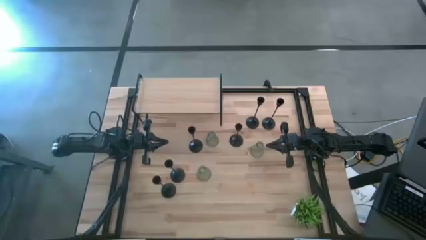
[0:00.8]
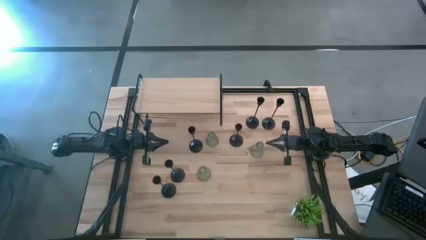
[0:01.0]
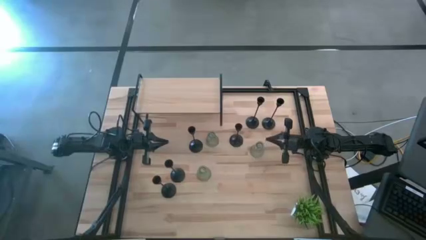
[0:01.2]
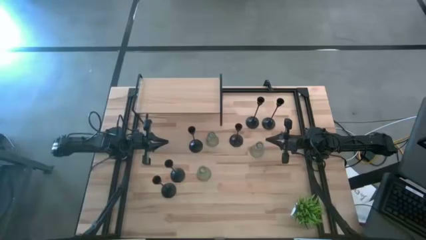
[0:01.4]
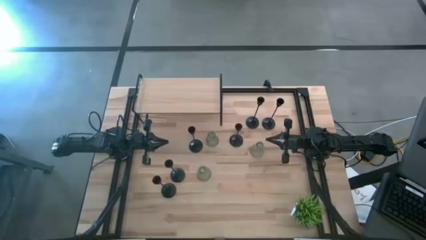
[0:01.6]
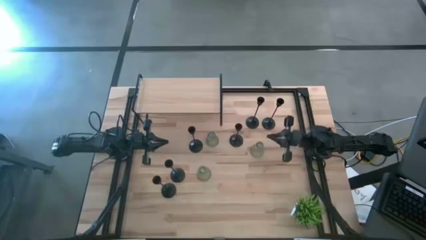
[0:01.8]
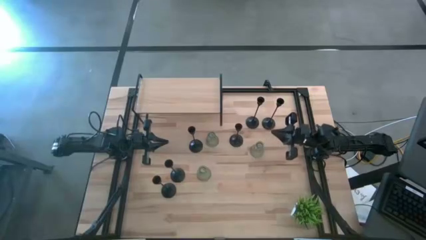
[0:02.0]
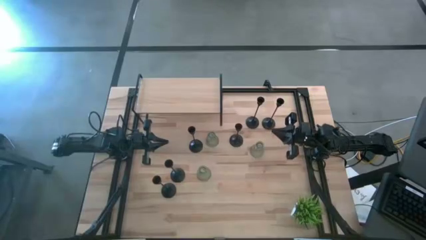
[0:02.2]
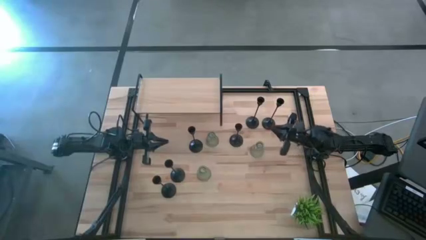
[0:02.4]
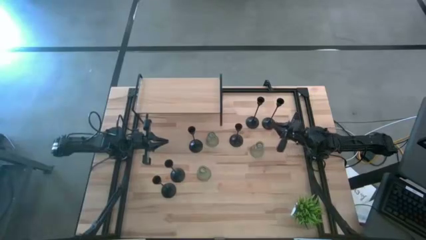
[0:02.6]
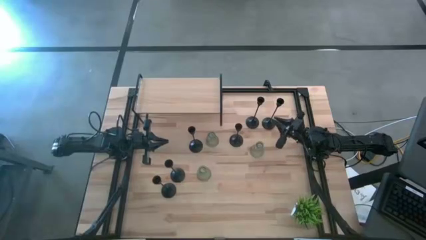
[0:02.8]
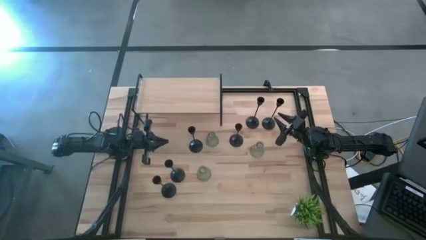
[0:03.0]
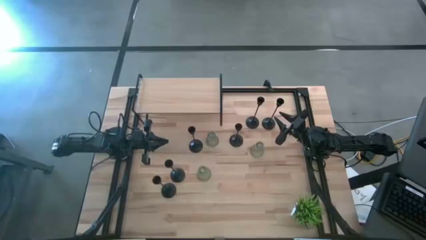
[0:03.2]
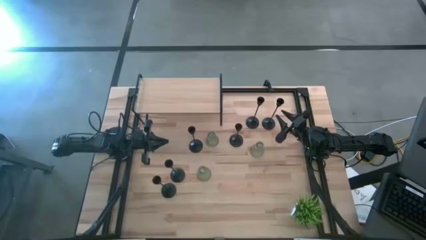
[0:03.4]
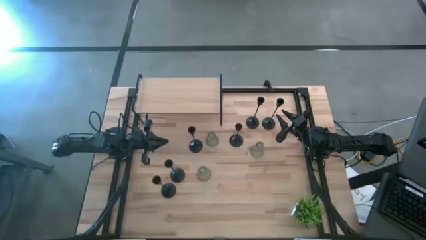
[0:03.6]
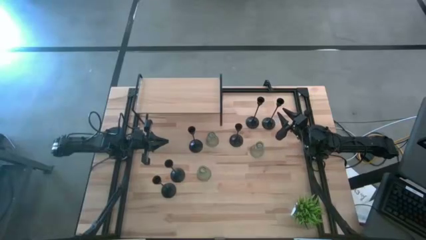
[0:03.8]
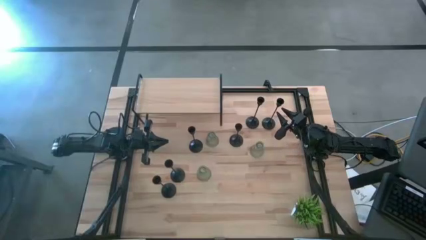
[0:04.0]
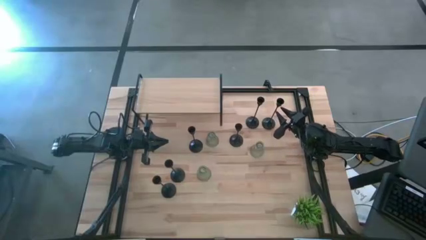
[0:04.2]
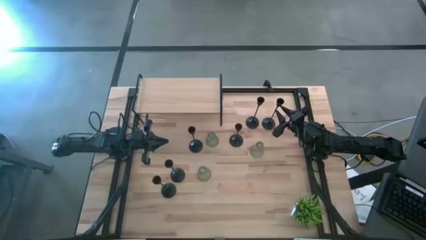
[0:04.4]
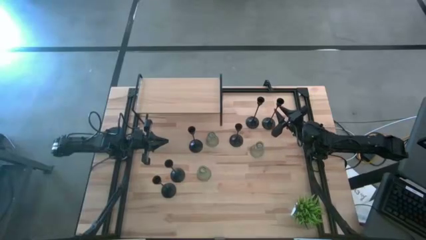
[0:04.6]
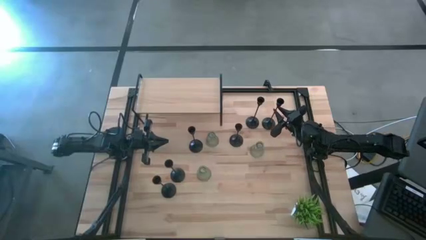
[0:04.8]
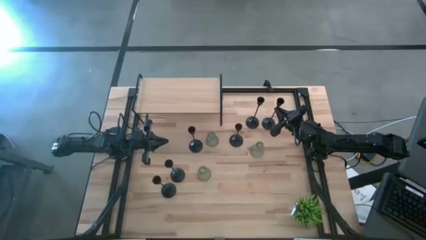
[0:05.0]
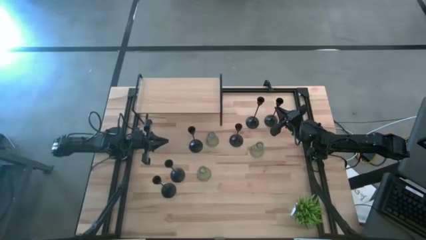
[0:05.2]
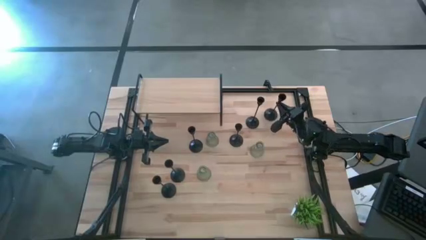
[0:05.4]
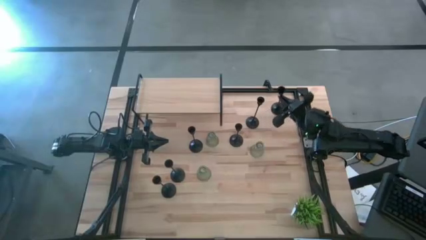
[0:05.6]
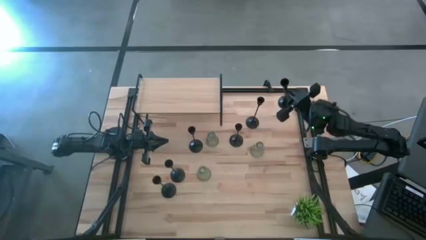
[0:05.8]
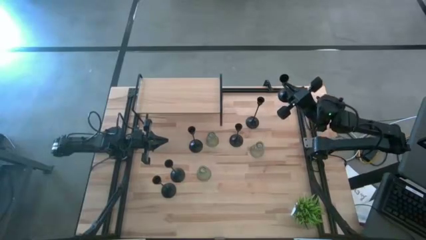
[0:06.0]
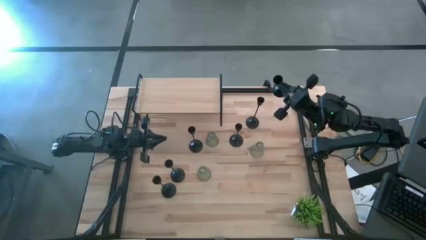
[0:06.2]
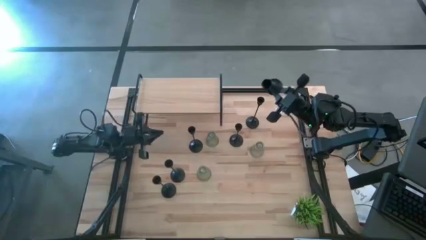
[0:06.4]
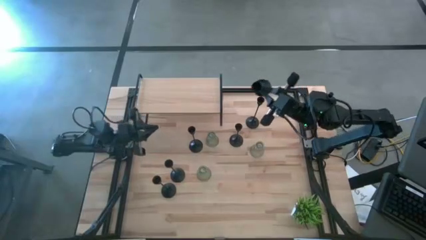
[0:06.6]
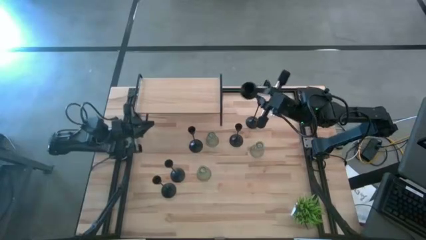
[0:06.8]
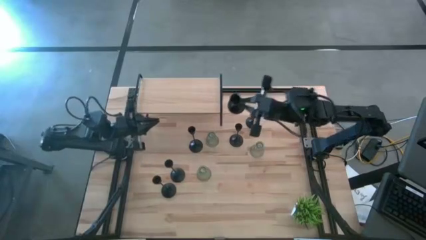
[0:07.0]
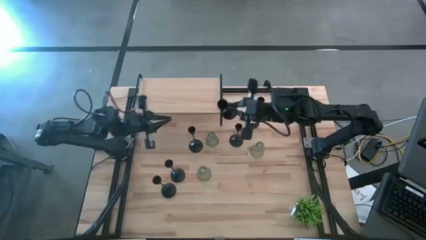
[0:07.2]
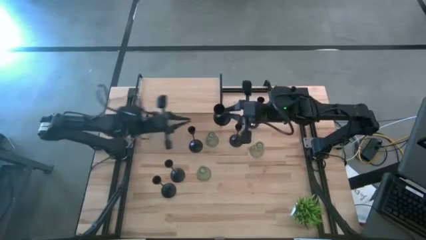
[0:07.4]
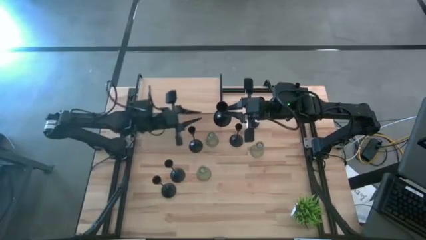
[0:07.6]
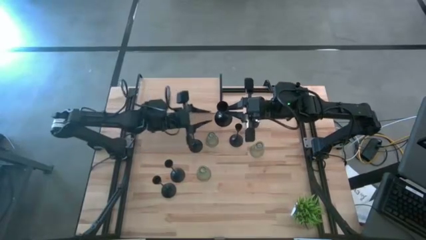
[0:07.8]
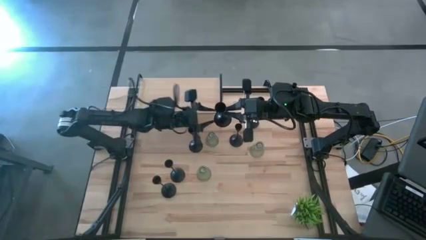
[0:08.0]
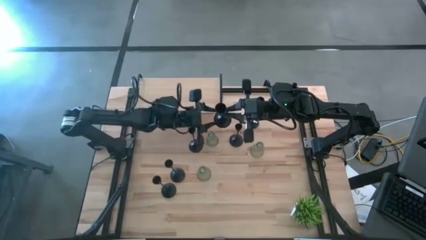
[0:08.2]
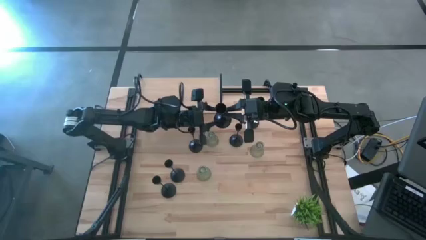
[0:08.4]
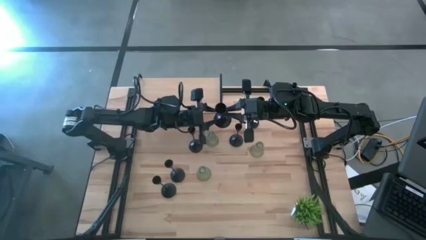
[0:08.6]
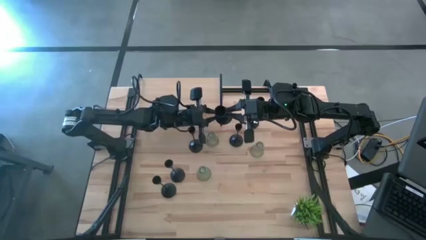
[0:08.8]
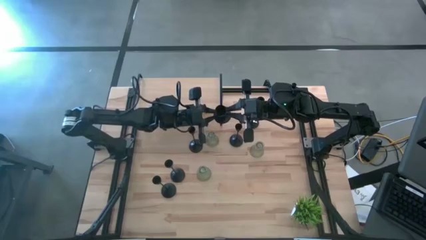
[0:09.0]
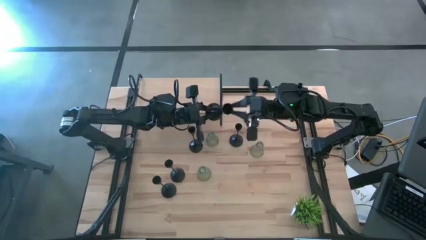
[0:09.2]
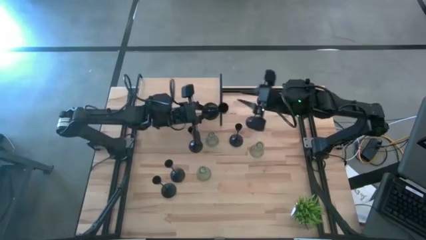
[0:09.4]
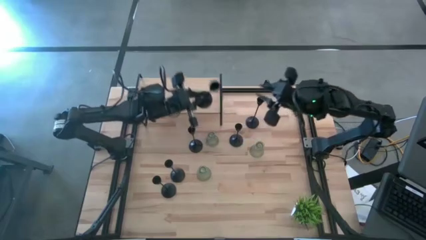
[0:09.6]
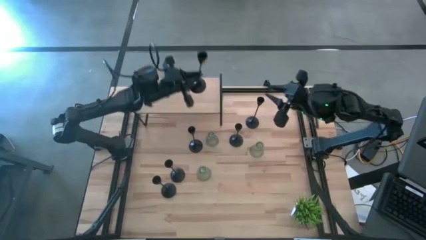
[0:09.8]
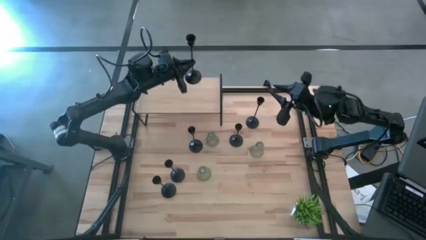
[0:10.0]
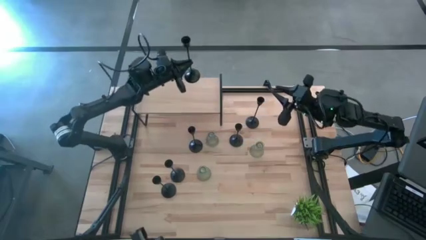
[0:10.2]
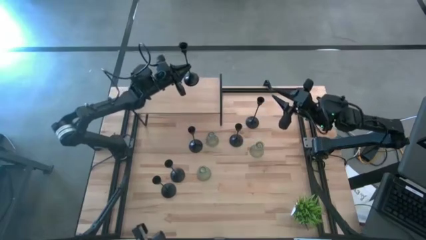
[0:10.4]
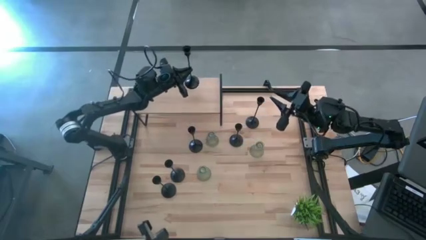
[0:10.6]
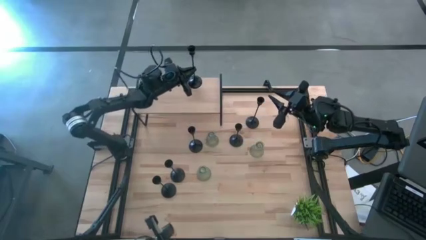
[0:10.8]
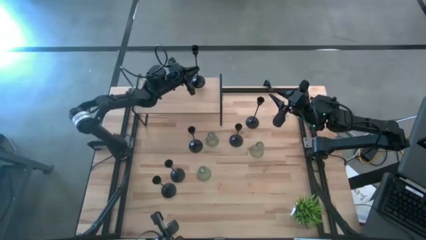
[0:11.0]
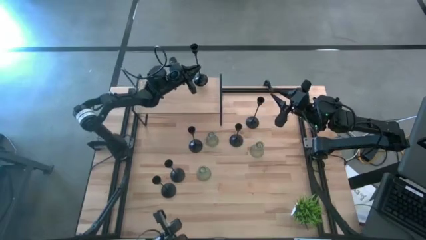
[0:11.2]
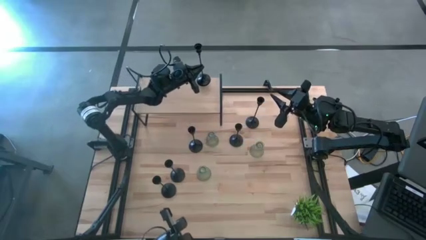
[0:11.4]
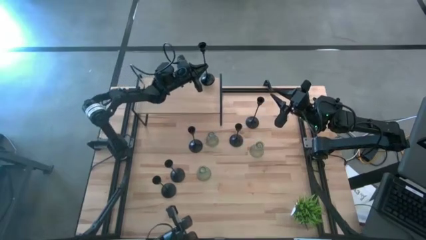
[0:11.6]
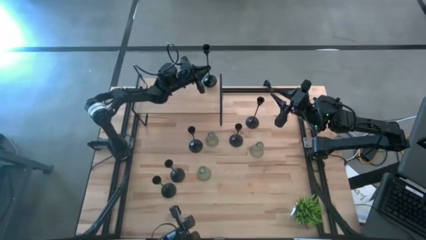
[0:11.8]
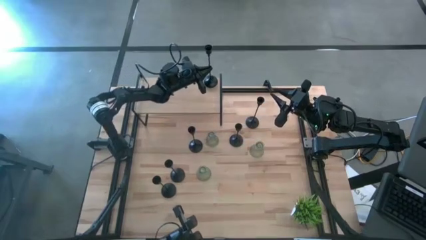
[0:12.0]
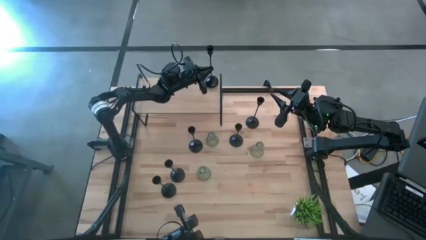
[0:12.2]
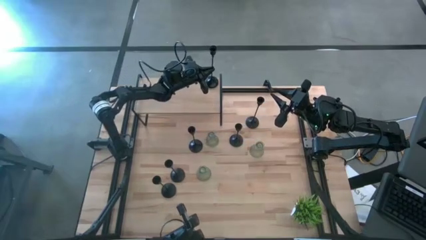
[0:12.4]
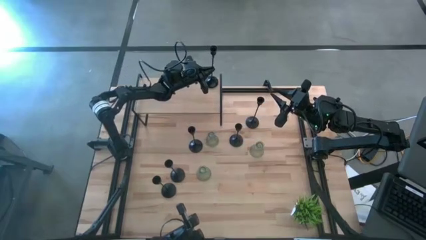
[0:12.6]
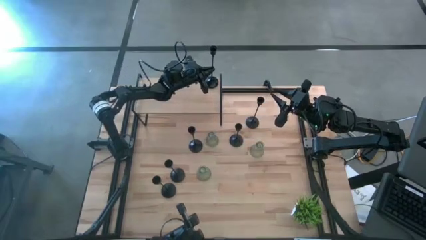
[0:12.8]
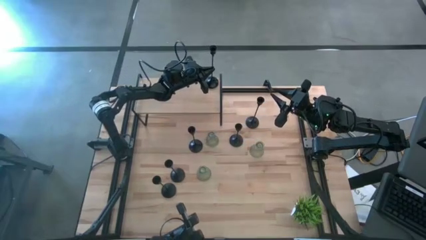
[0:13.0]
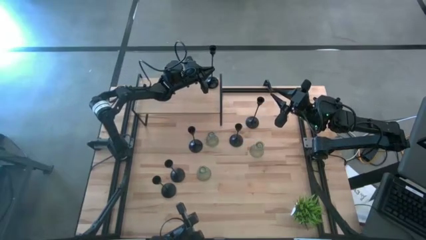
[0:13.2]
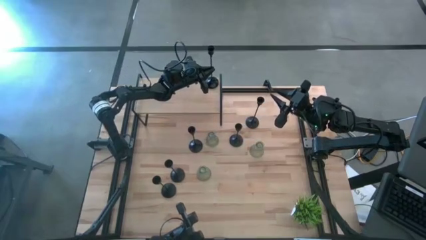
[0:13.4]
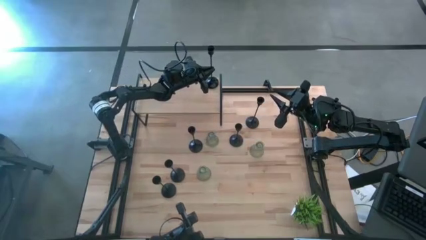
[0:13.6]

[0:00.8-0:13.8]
Task: Pick & Place candle stick holders
Put the large black candle holder on the shelf
